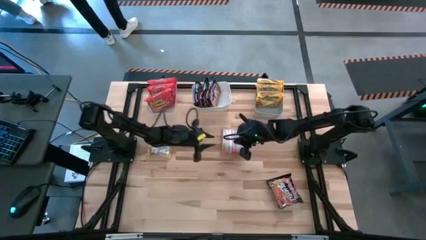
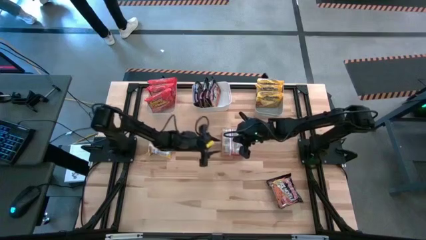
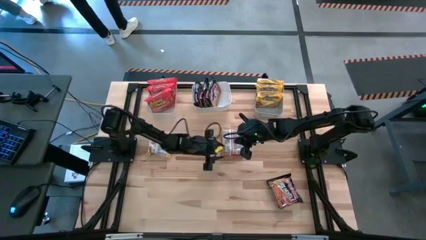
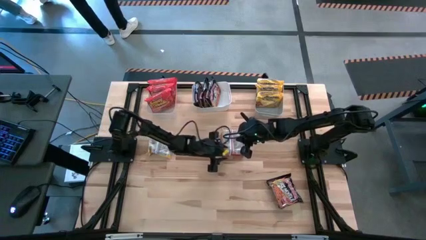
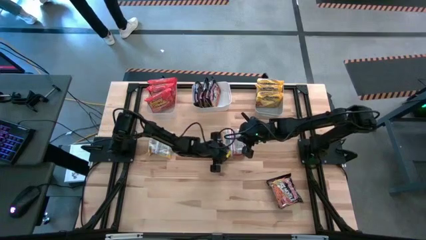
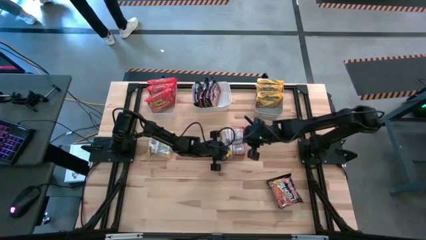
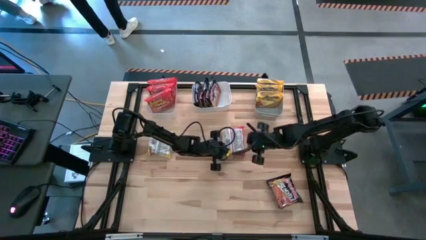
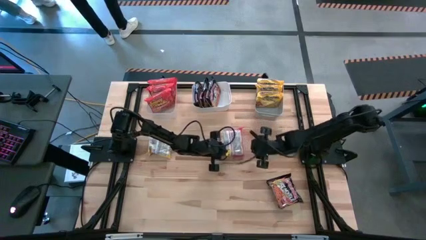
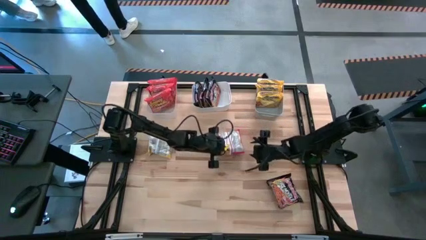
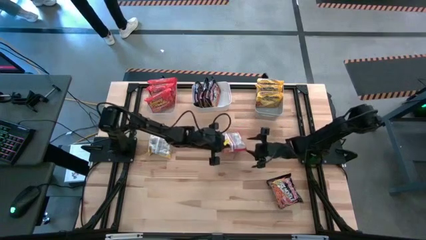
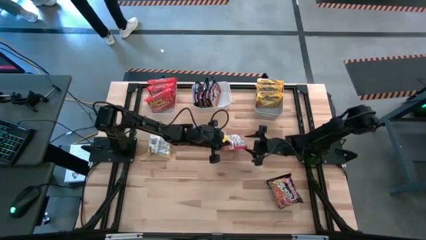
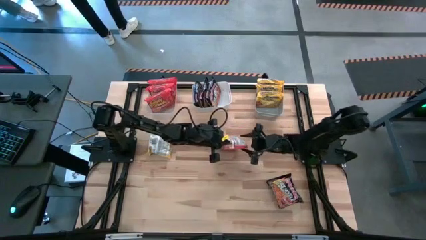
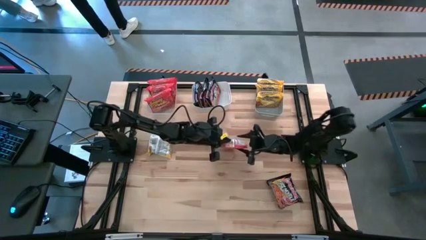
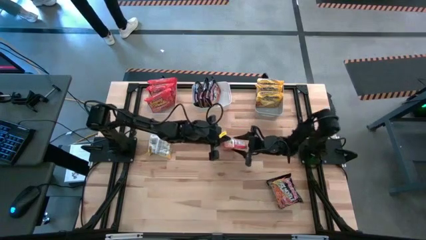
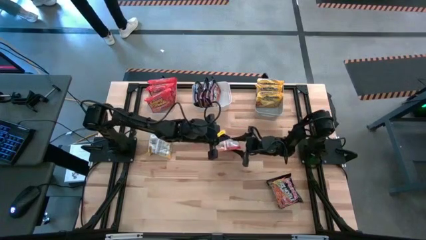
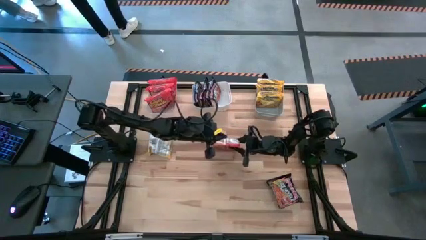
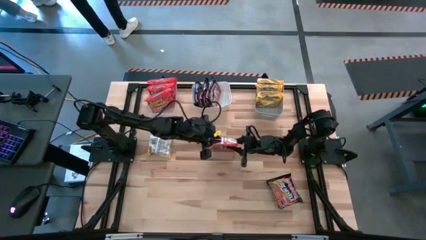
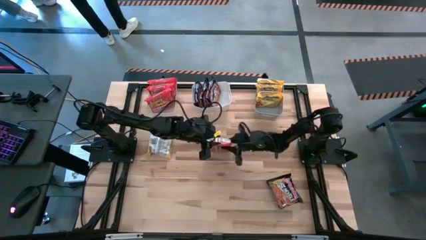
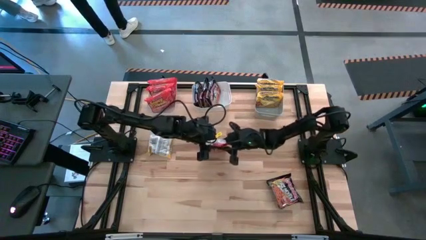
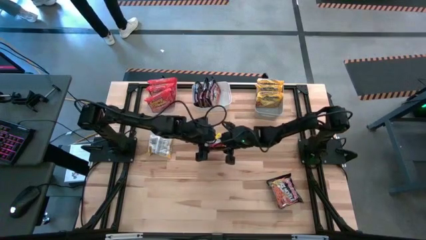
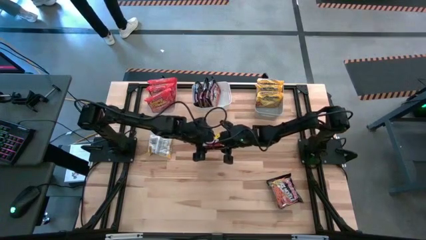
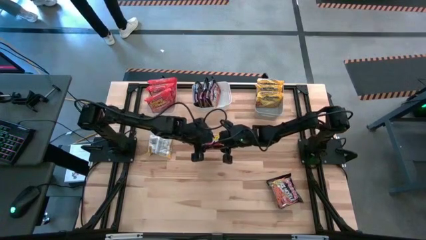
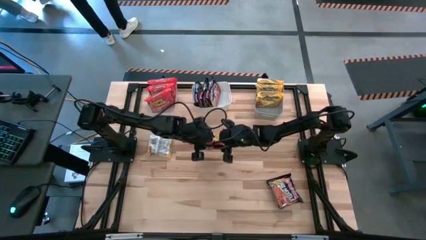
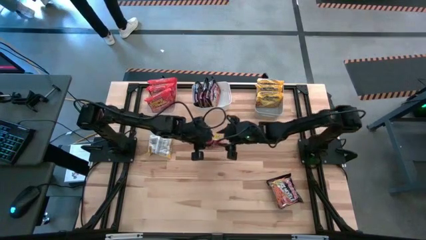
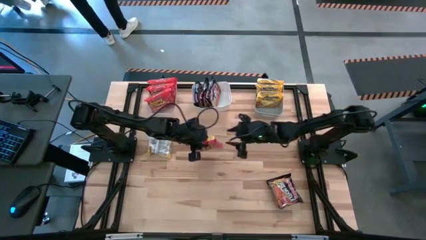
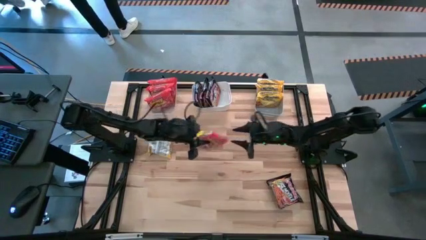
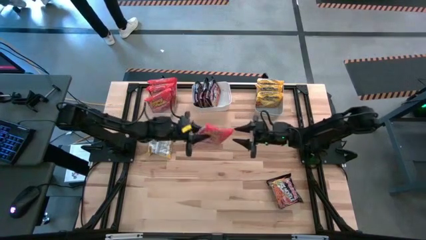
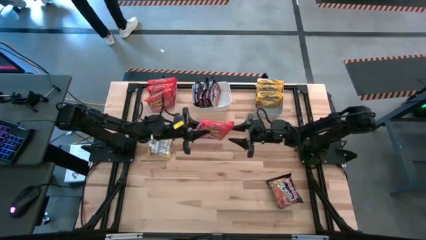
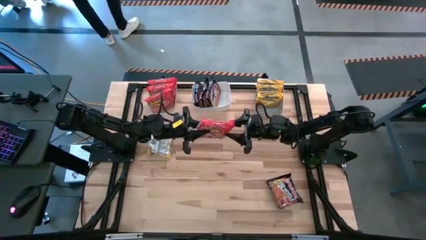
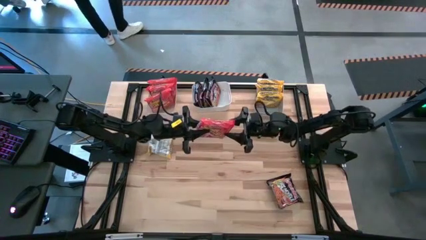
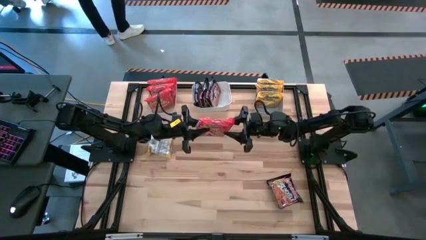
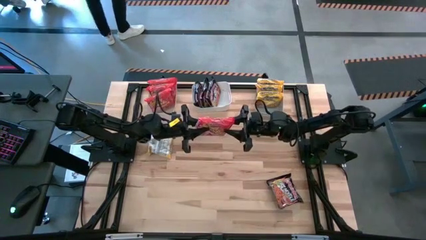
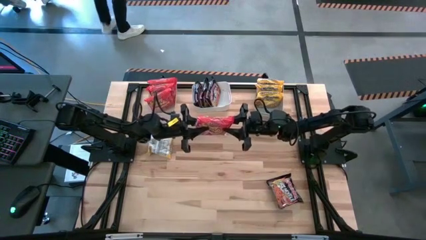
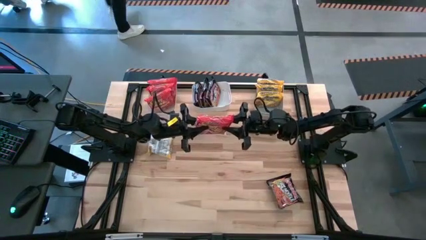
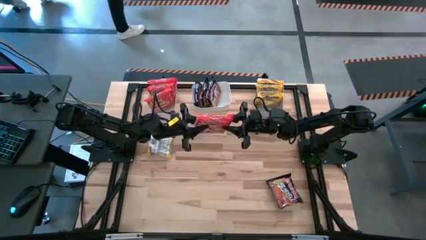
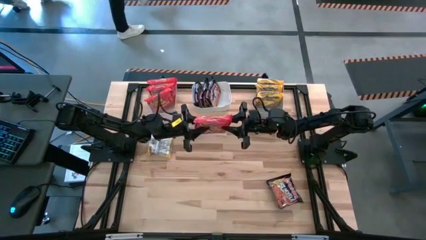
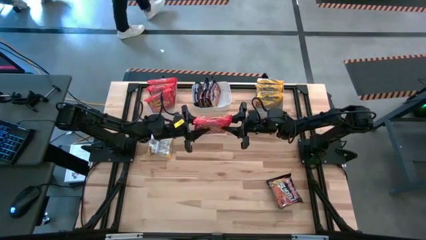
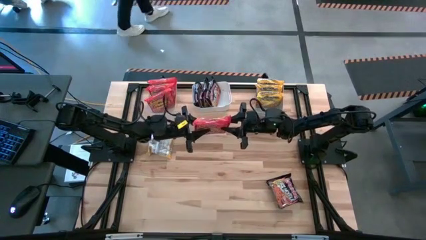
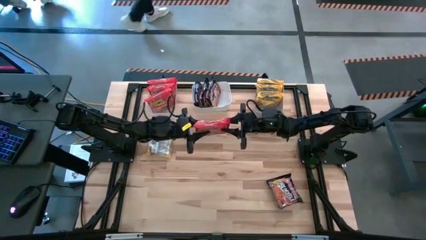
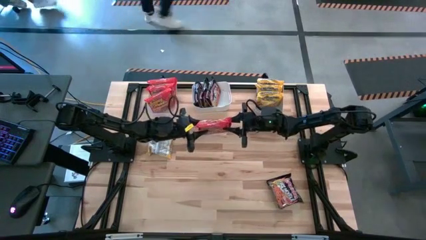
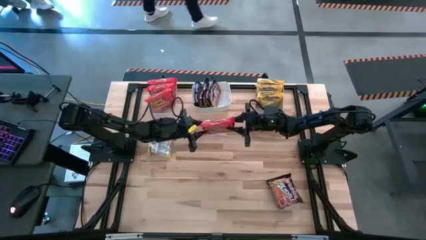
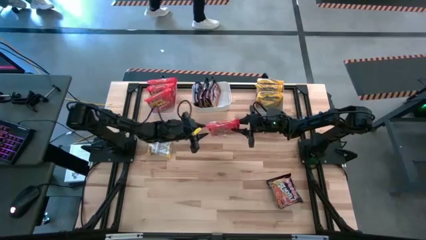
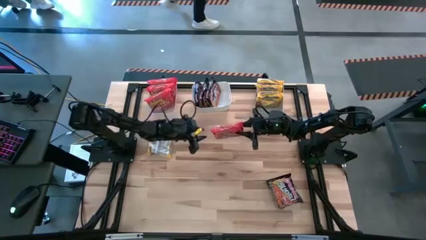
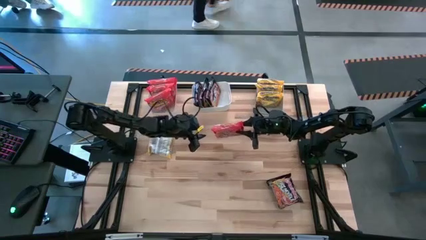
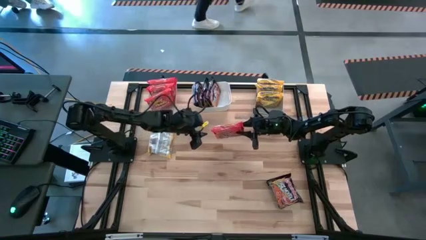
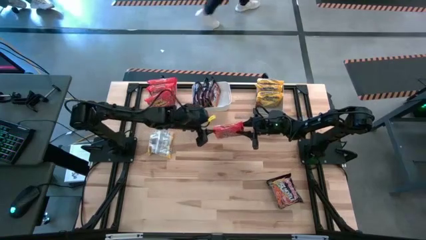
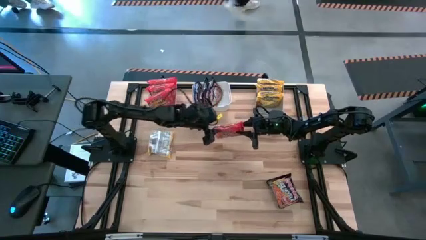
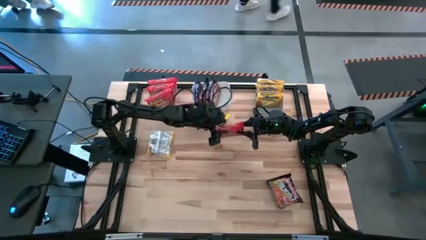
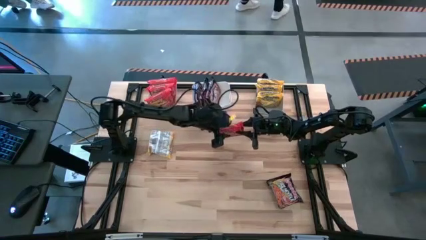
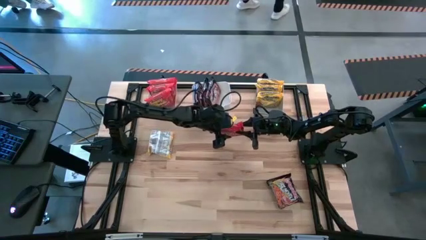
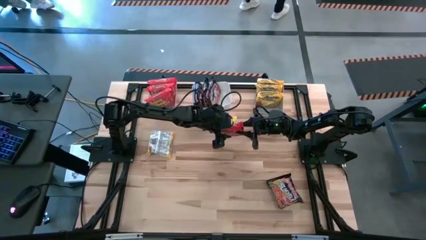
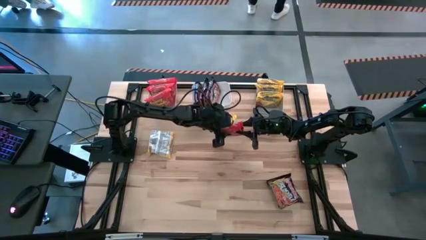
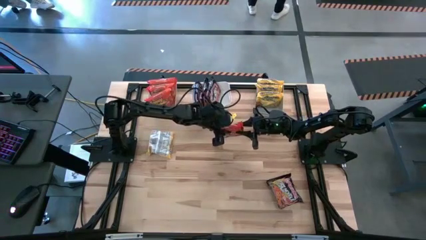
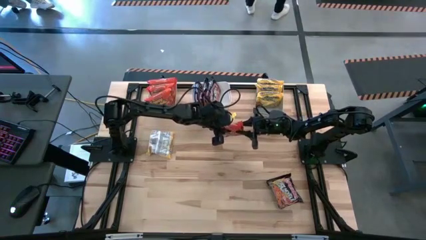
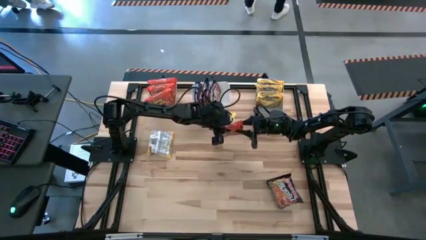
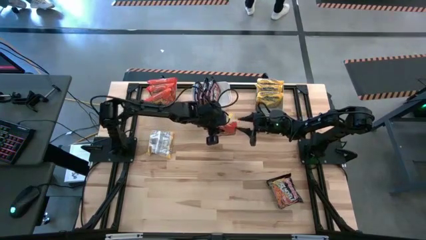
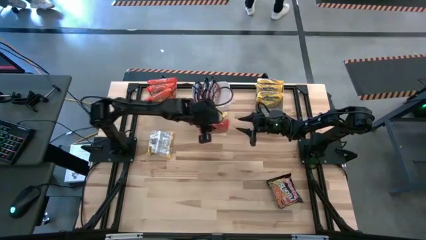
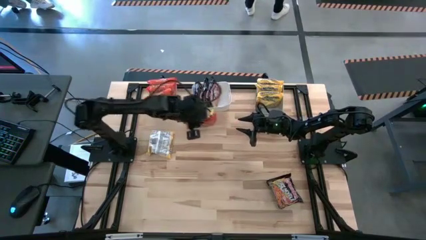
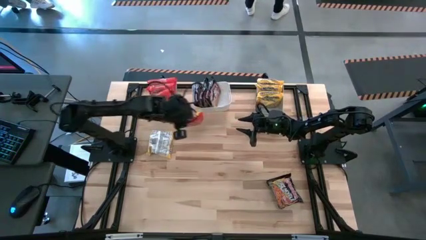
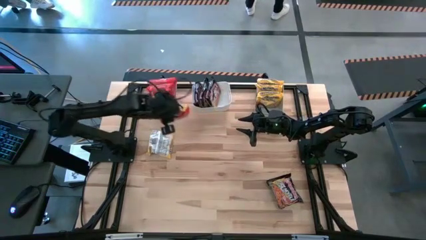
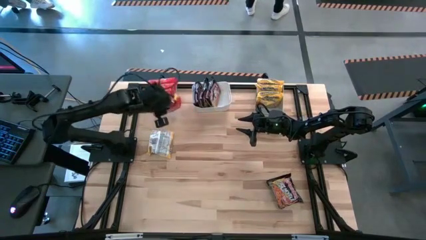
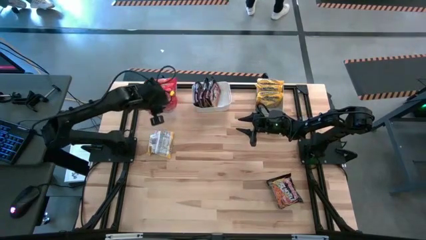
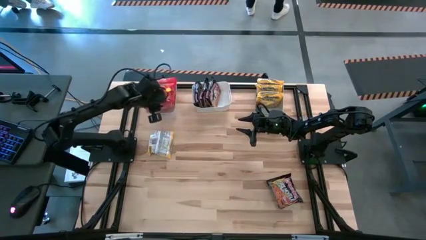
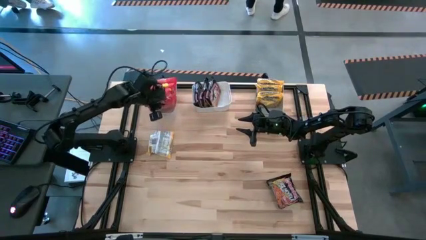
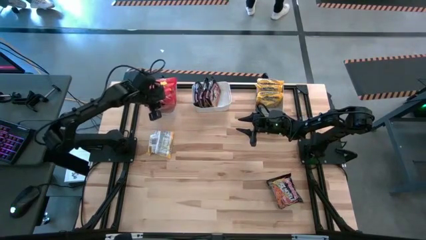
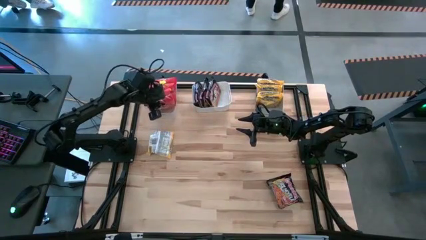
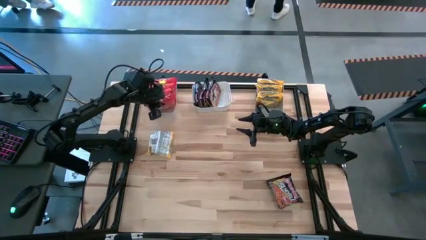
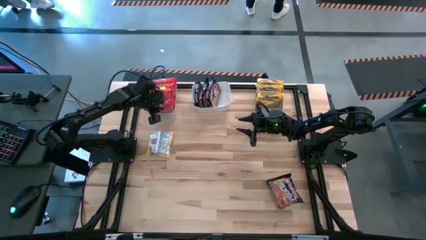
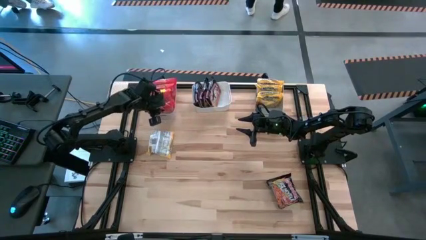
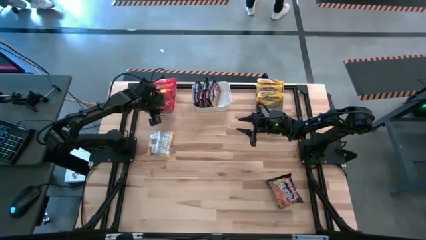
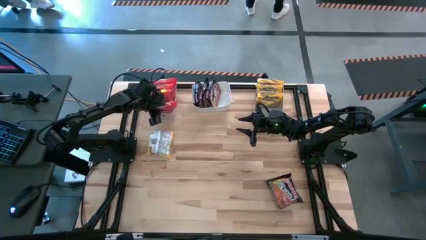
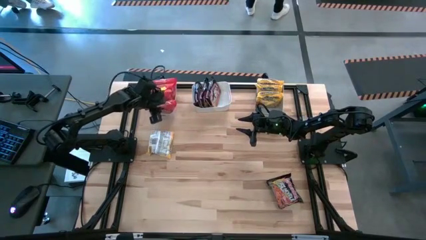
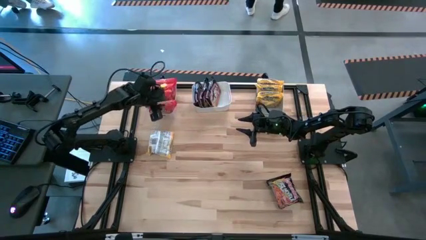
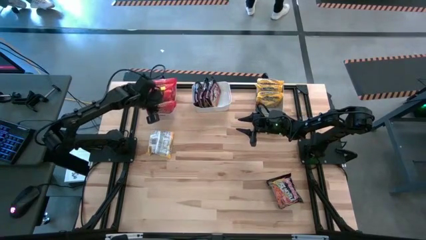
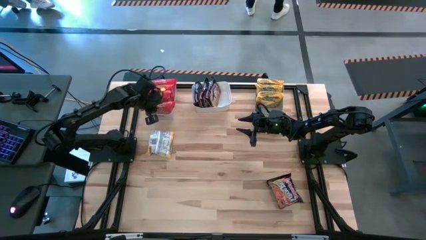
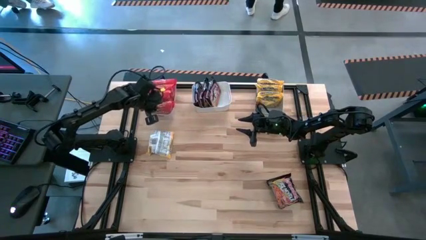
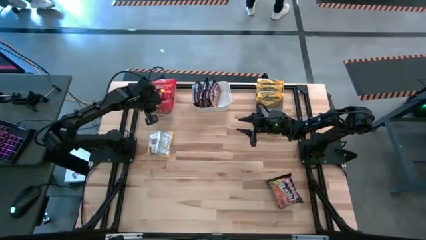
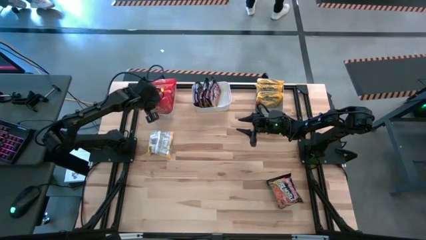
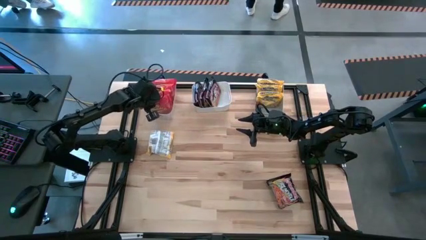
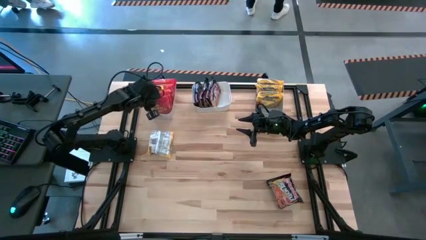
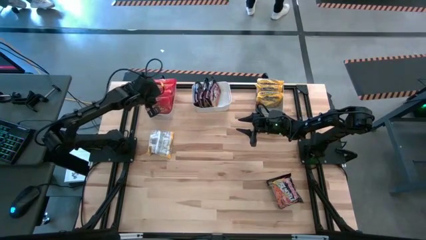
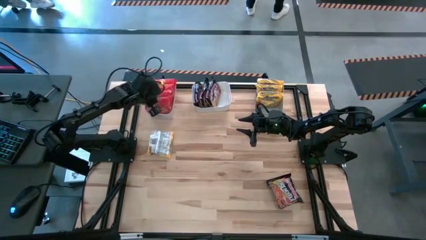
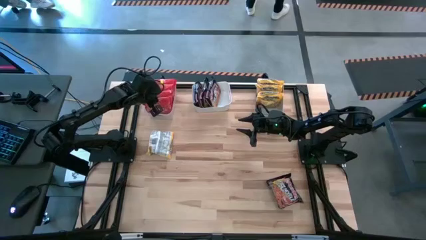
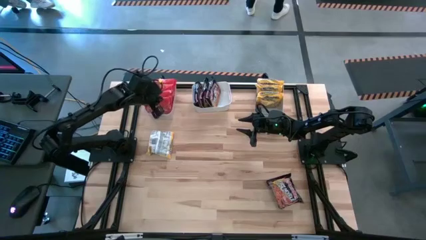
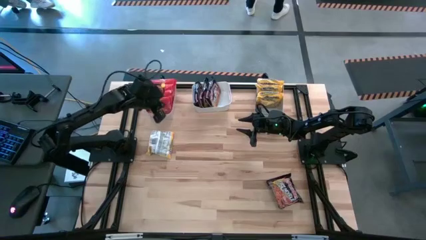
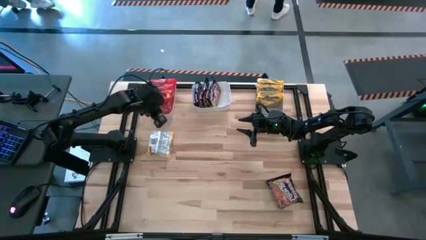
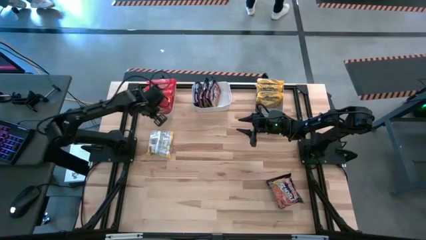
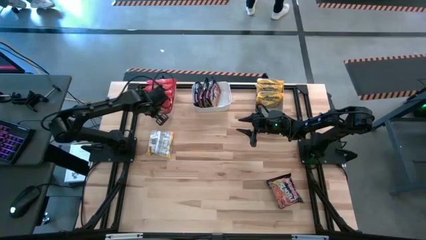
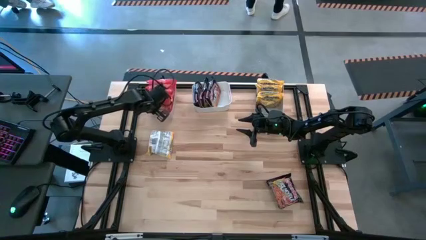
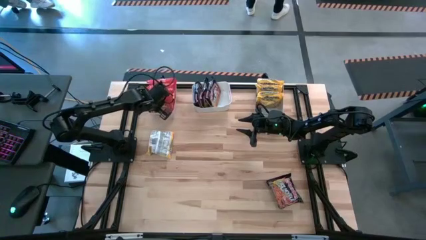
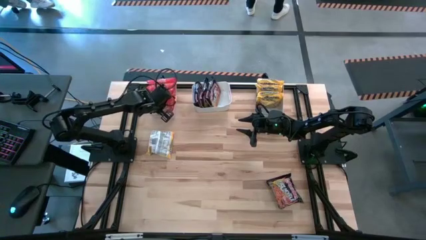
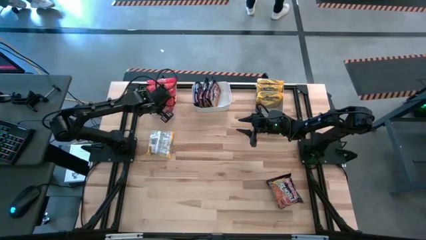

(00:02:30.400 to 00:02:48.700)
Task: Sort Maruchan noodles
Put the orange noodle pack into the transparent bin
